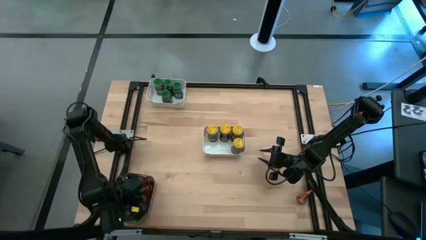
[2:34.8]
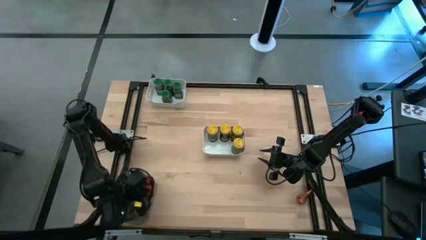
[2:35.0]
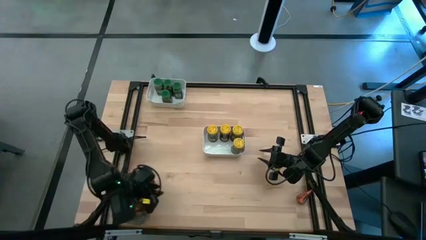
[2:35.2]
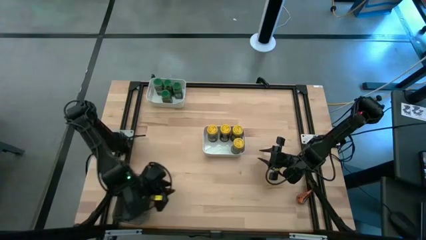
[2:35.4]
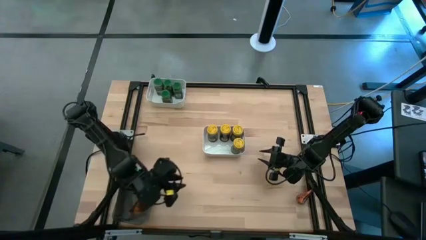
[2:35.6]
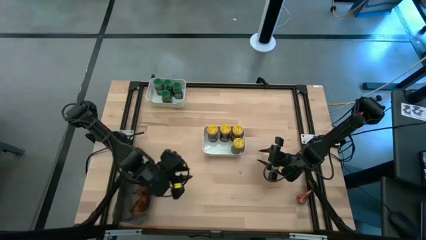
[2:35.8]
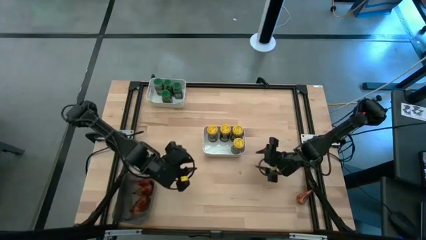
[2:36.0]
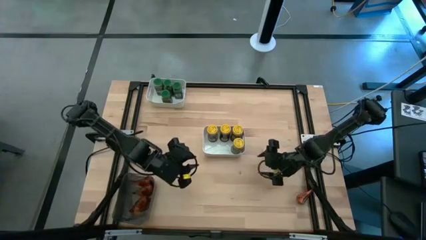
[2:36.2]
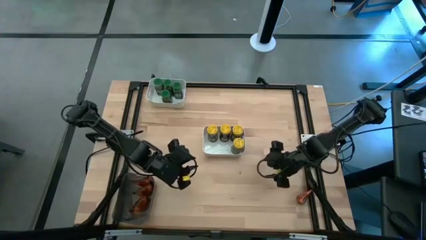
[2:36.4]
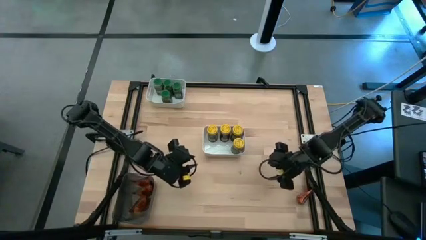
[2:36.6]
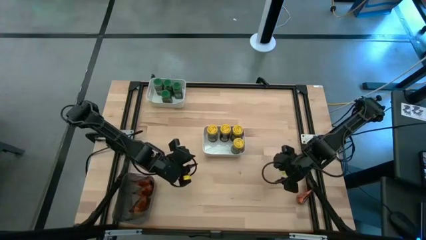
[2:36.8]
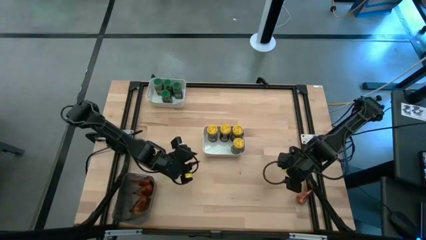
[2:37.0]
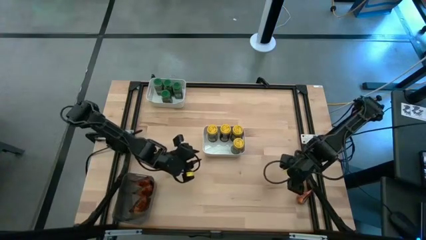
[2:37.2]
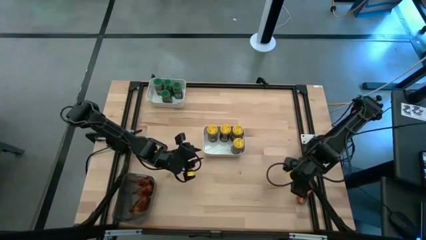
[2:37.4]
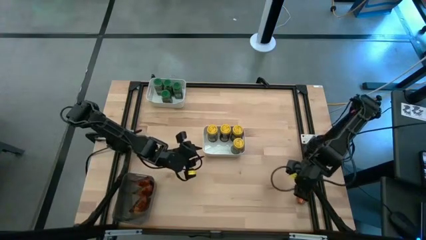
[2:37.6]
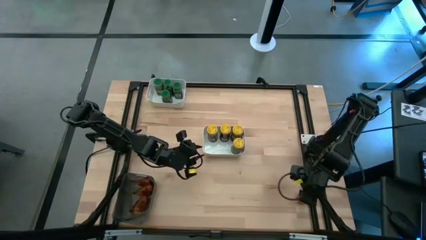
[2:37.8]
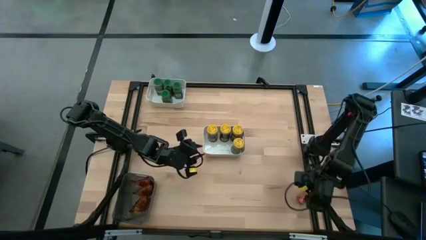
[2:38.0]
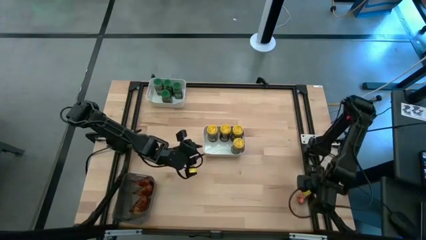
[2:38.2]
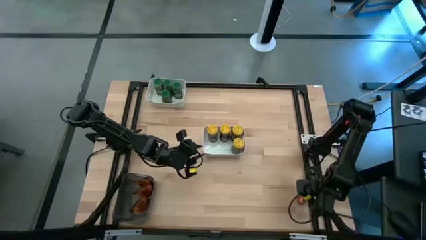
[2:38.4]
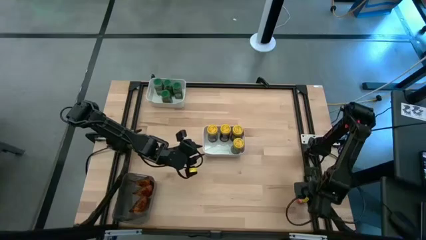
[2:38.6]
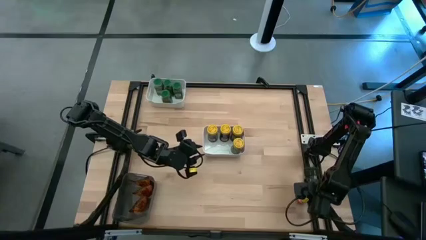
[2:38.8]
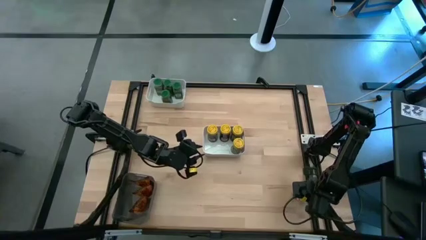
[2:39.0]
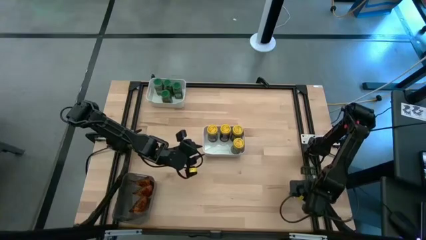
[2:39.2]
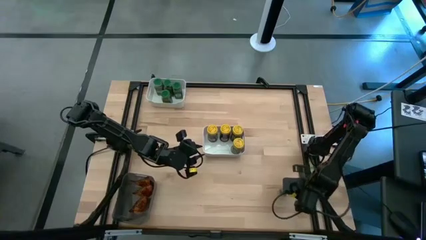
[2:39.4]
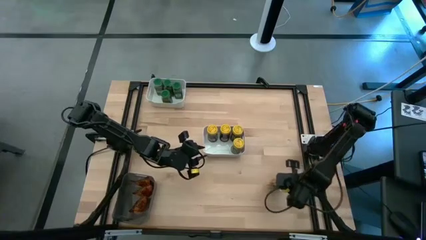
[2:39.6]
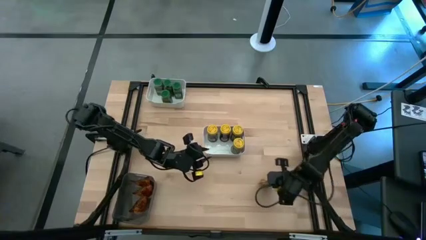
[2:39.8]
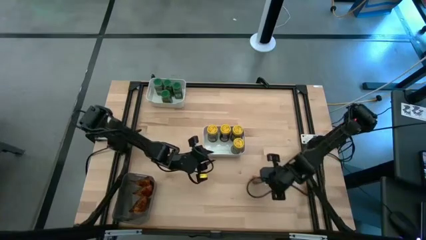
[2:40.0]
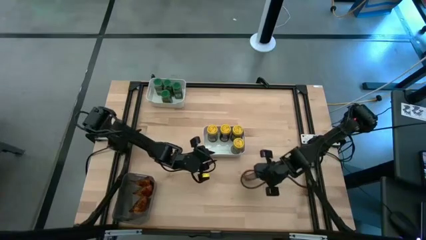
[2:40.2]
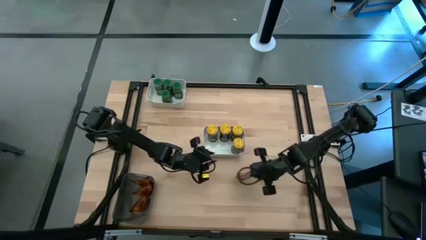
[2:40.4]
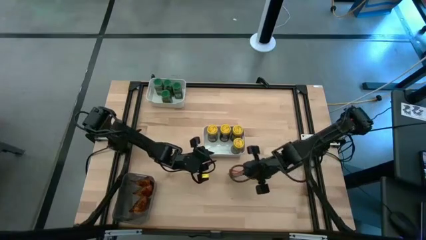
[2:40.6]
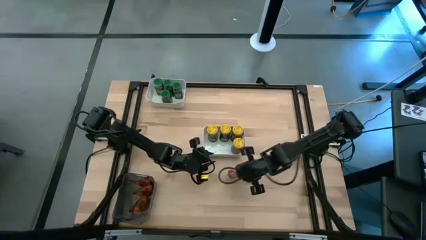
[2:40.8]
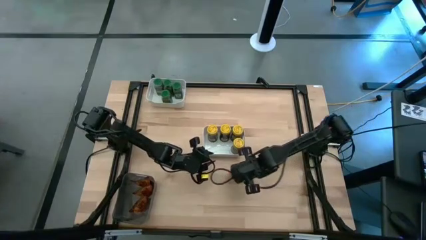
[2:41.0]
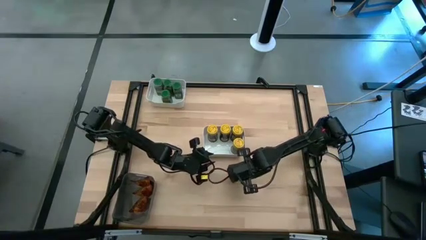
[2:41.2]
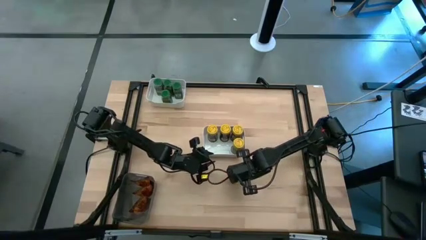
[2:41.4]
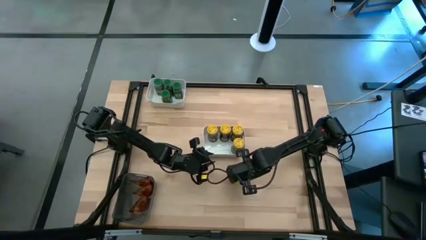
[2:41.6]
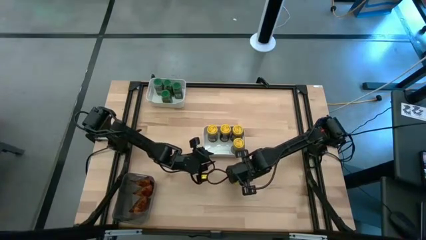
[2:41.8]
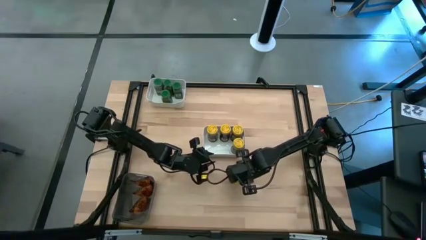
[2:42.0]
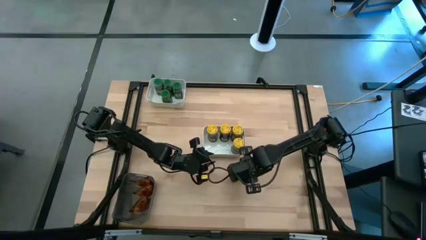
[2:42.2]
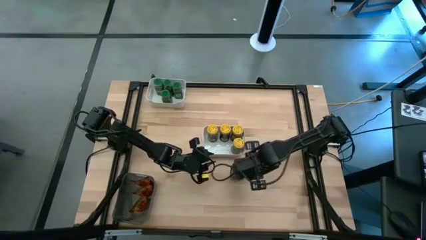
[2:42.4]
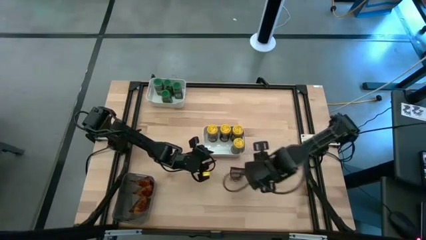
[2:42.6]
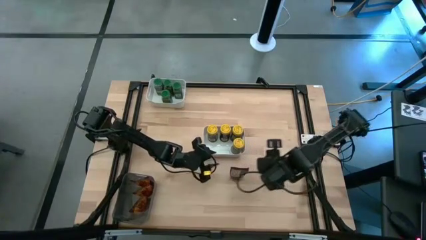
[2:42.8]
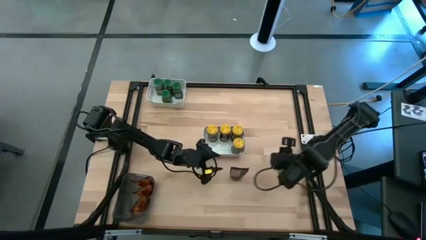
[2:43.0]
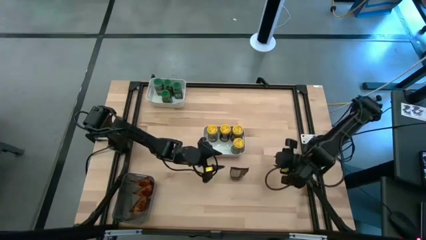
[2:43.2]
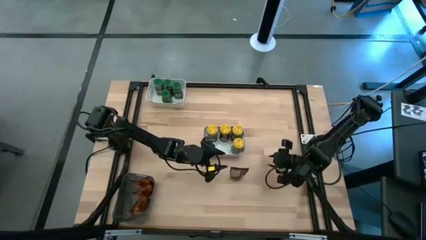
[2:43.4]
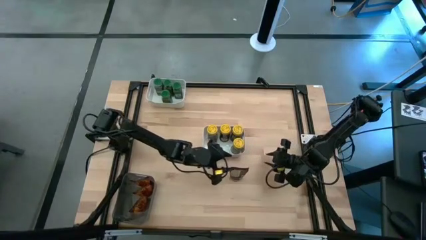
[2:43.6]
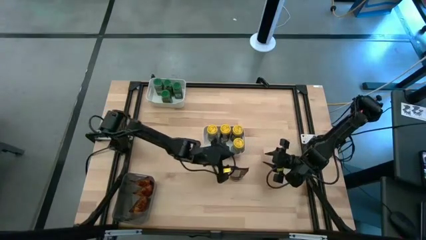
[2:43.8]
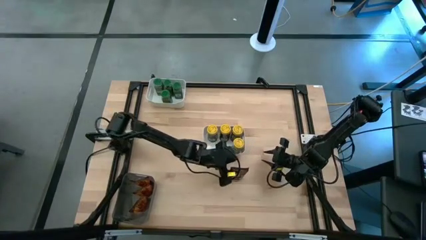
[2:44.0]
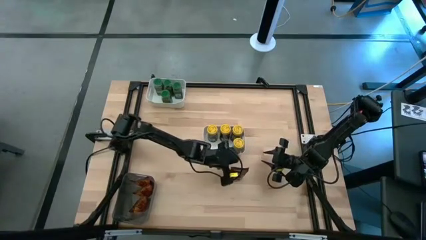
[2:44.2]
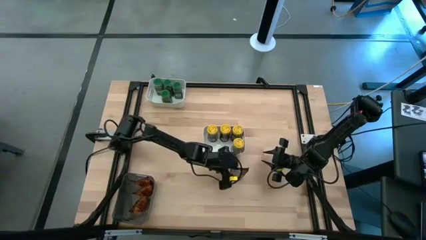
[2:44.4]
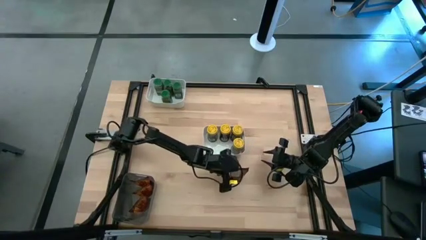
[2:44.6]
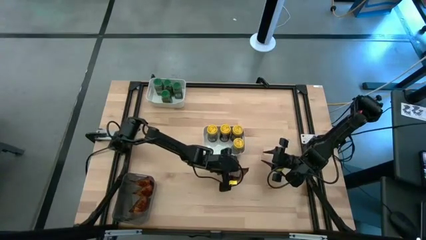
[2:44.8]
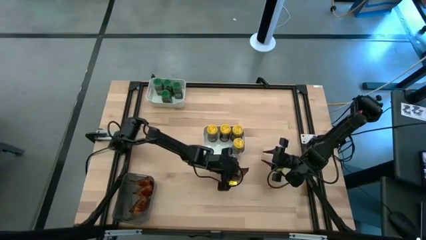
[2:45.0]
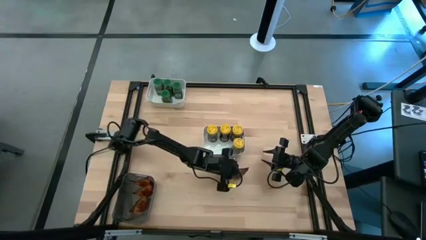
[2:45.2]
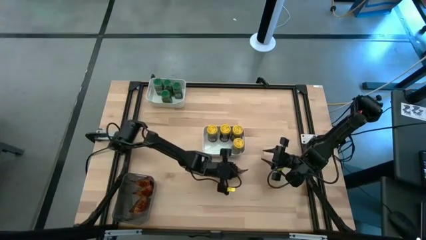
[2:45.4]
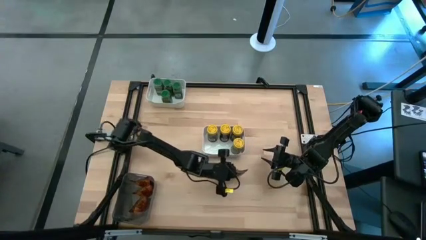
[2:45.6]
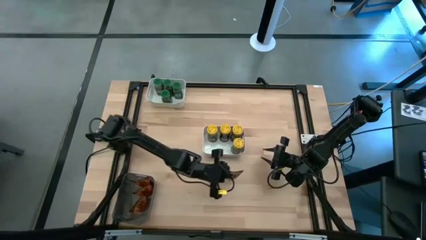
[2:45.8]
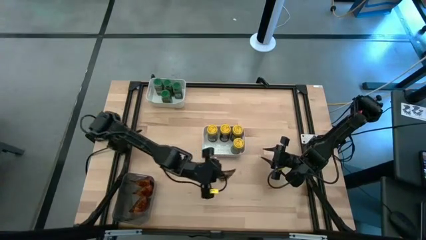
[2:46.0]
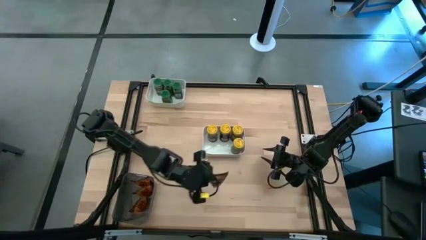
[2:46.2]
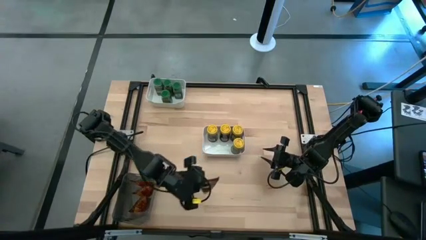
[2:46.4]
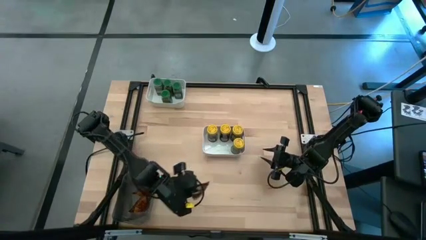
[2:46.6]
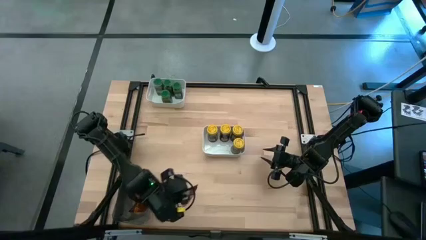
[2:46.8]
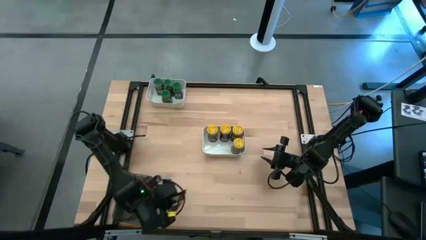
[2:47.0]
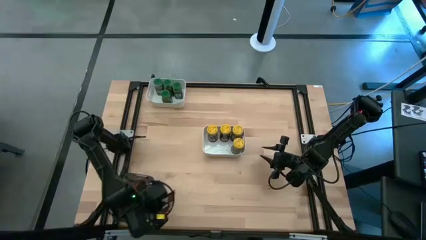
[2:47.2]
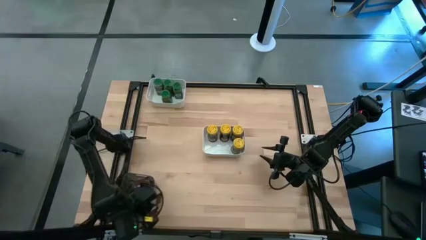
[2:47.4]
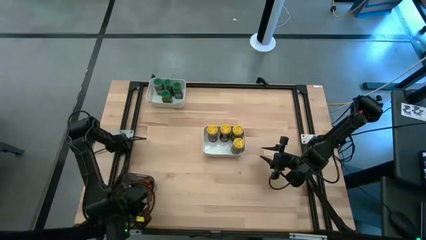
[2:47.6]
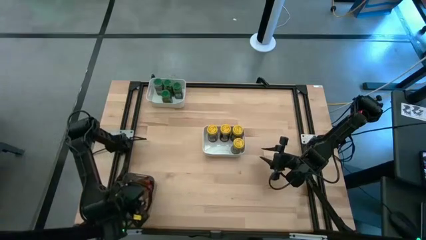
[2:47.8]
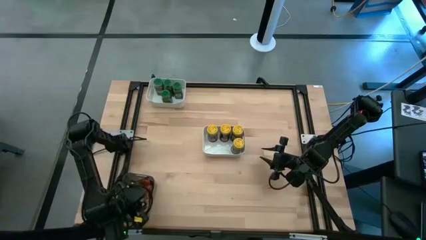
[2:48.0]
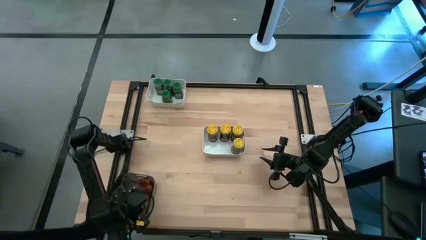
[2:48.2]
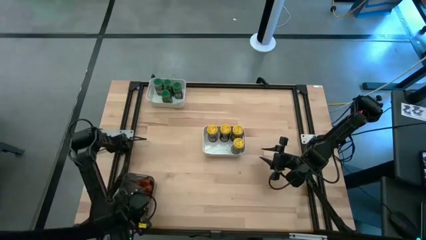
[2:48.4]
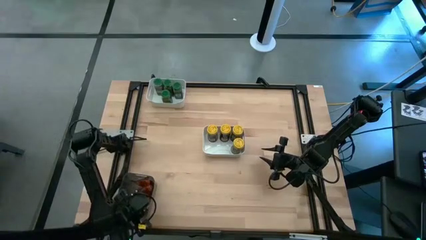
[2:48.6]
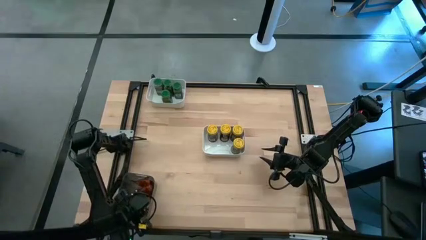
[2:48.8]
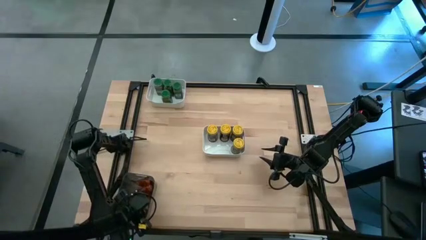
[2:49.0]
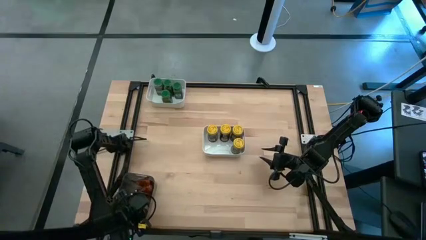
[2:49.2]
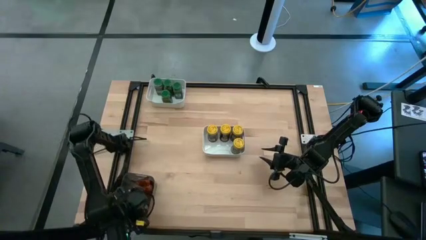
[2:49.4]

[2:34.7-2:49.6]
Task: Sort spices by type
Put the orange seasoning pack into the black bin
